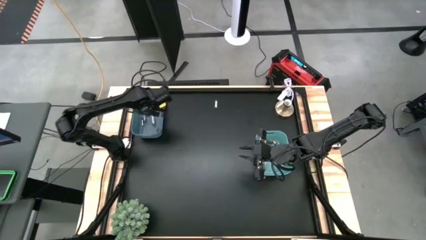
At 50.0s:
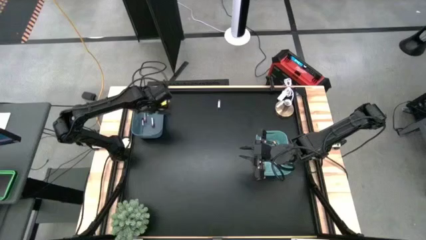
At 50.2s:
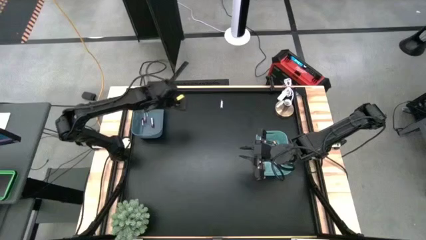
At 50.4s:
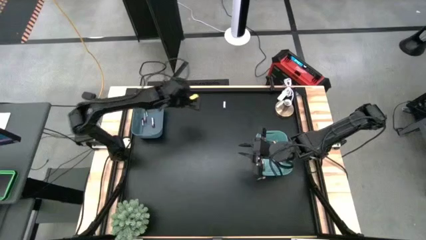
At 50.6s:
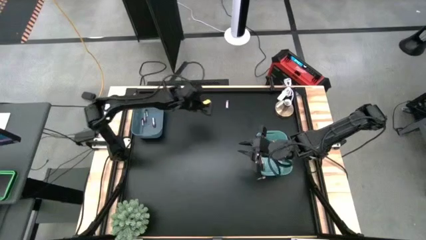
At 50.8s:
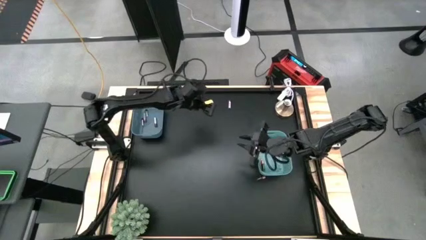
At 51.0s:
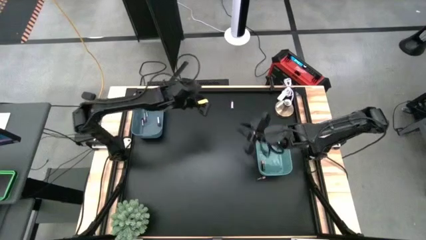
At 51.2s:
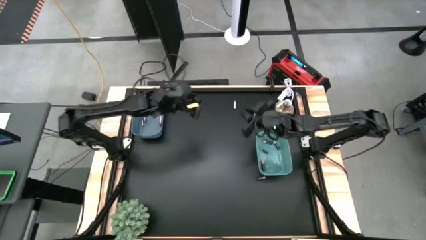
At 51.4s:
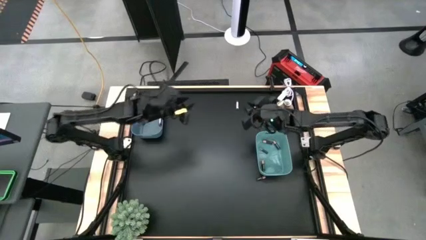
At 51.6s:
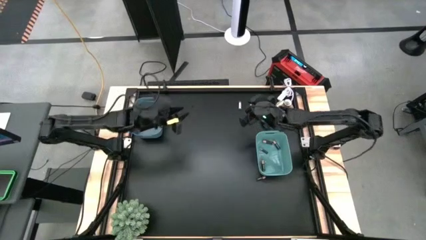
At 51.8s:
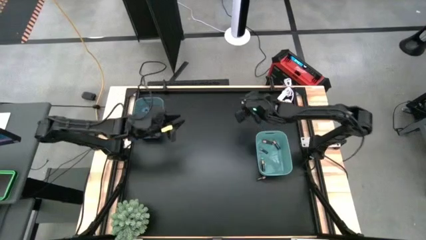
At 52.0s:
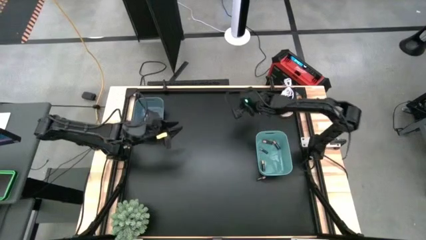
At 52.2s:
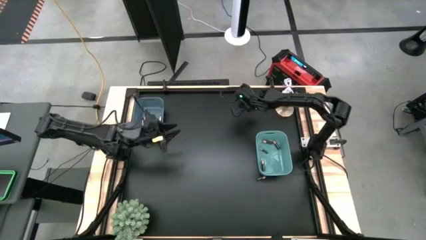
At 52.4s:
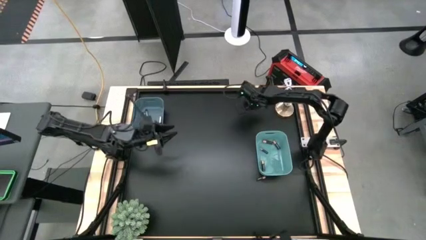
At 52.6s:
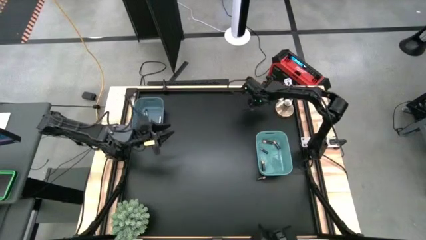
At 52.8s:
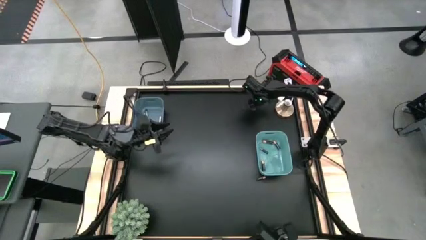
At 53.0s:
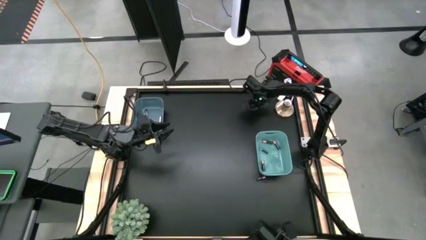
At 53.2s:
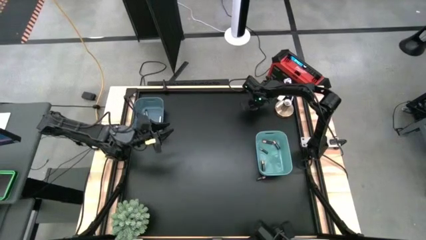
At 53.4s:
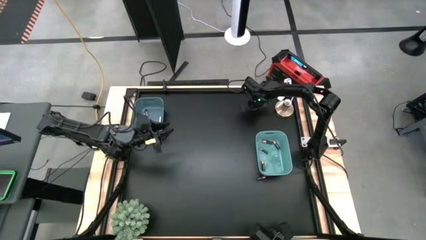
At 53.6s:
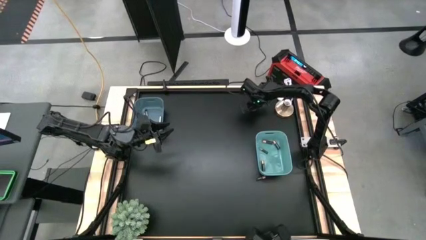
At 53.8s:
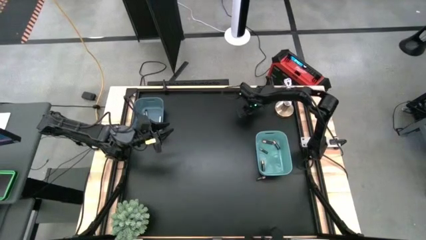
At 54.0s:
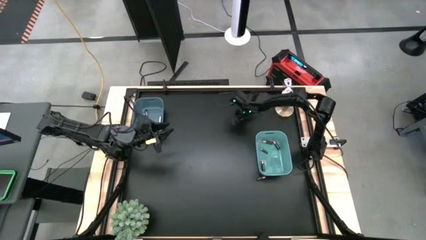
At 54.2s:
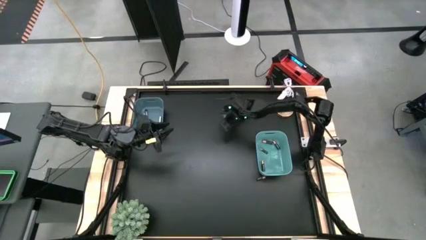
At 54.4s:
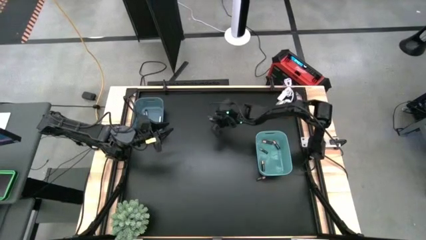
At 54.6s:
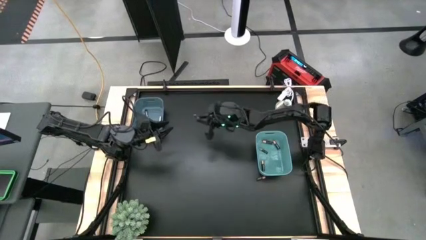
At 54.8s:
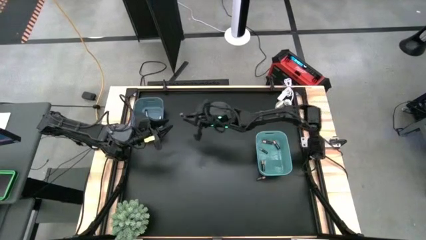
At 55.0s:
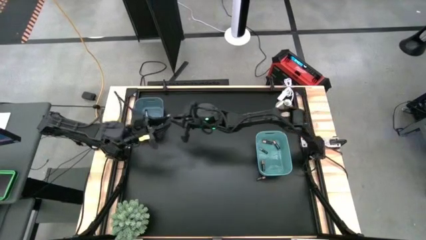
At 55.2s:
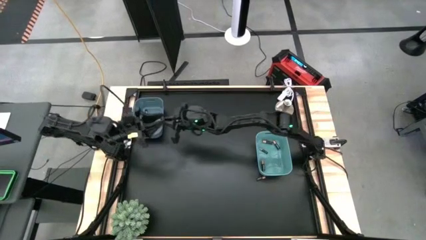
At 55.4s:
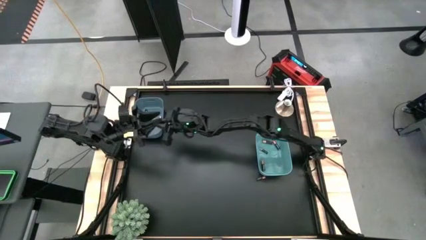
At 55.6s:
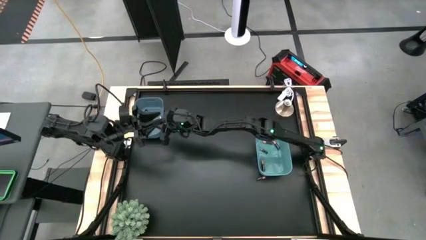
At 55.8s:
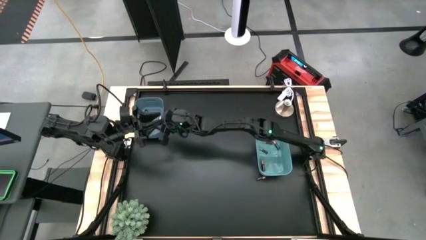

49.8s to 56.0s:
Task: Sort batteries
Put the silver battery into the blue bin

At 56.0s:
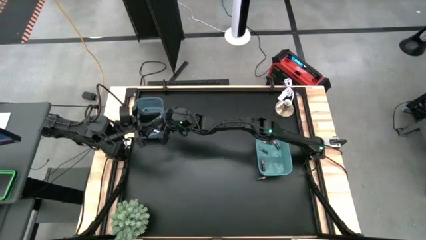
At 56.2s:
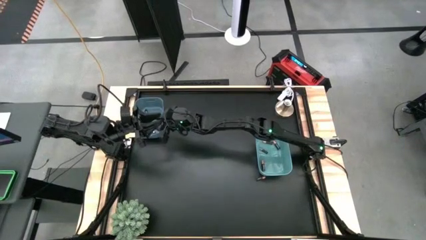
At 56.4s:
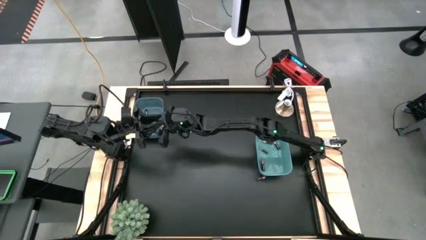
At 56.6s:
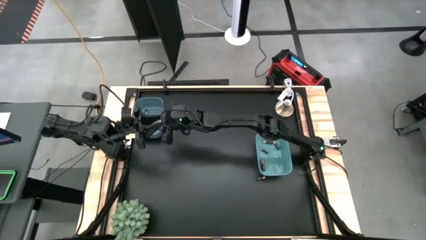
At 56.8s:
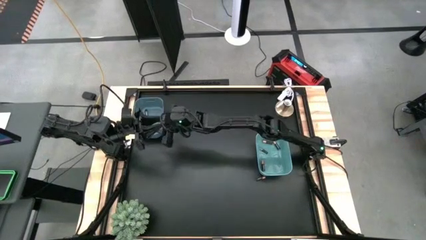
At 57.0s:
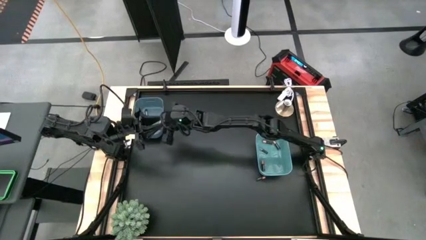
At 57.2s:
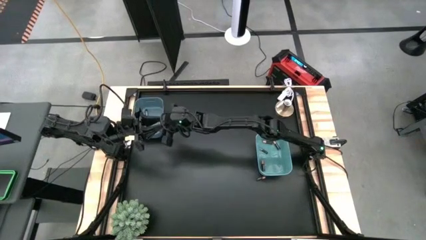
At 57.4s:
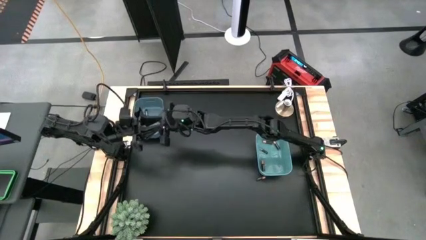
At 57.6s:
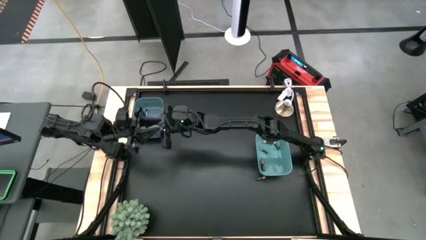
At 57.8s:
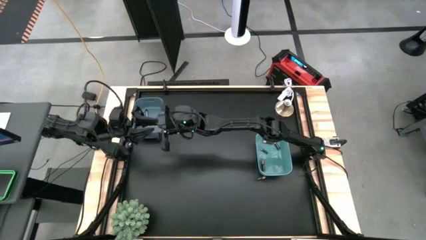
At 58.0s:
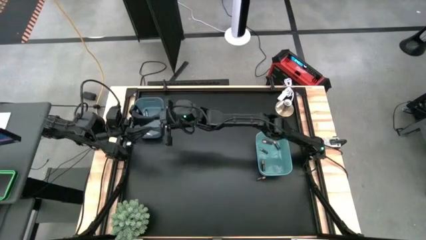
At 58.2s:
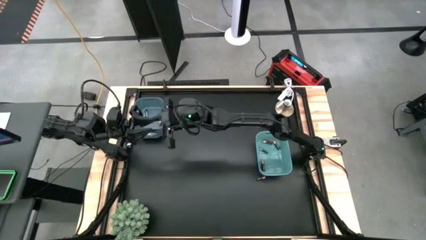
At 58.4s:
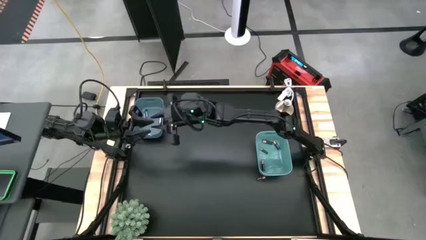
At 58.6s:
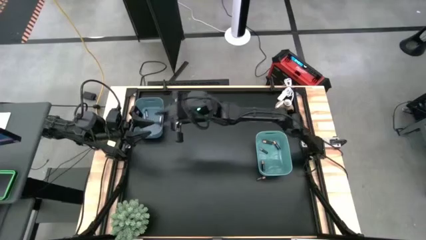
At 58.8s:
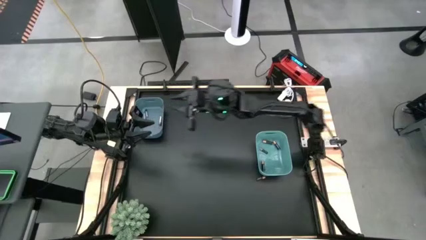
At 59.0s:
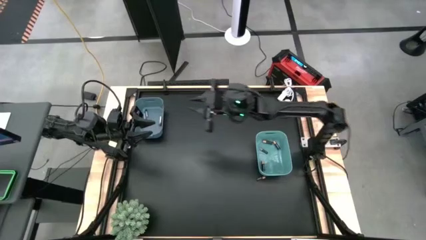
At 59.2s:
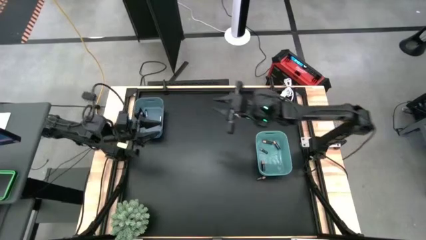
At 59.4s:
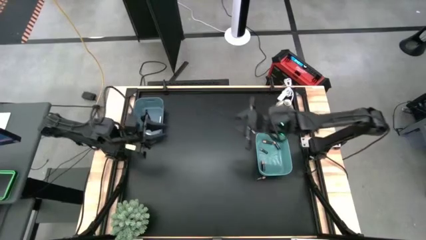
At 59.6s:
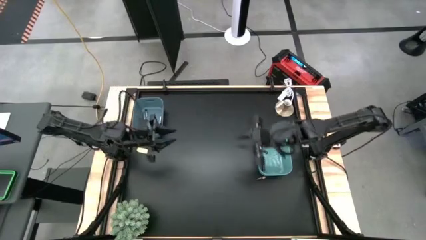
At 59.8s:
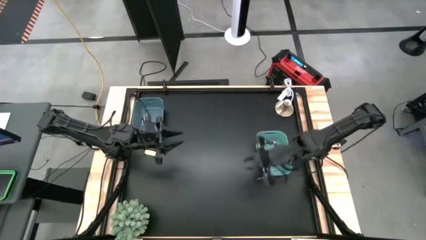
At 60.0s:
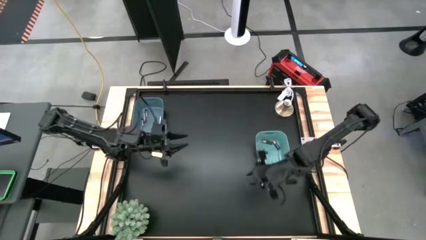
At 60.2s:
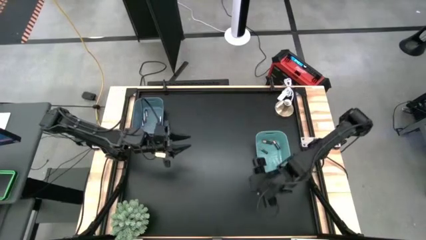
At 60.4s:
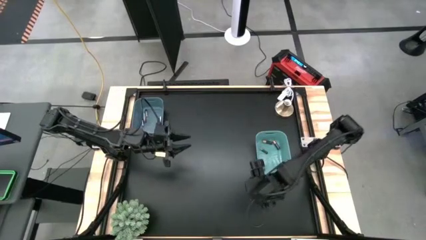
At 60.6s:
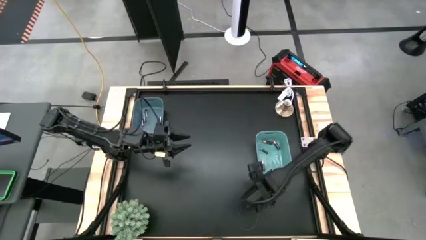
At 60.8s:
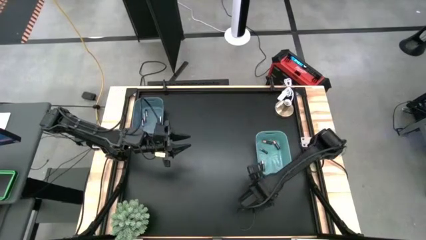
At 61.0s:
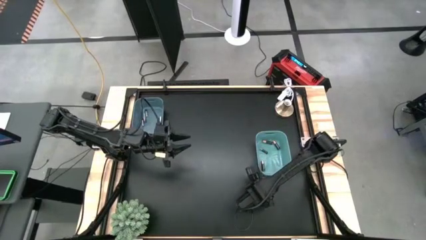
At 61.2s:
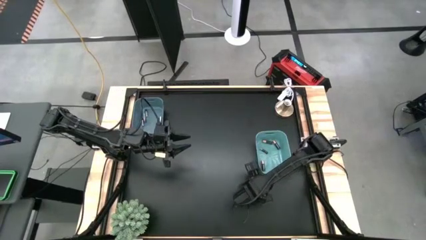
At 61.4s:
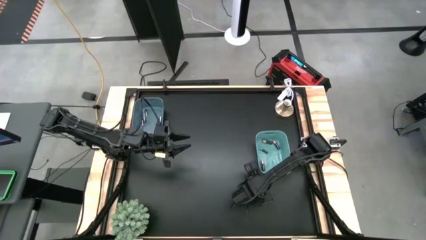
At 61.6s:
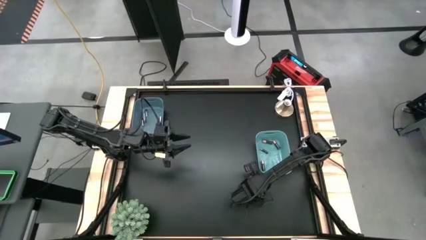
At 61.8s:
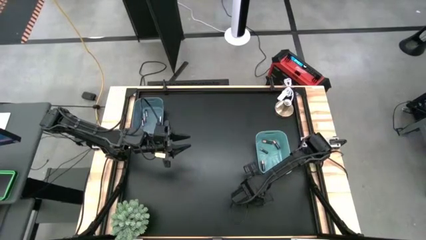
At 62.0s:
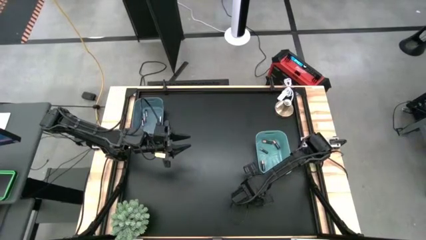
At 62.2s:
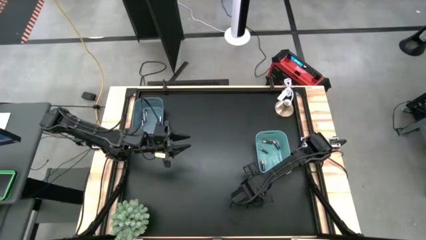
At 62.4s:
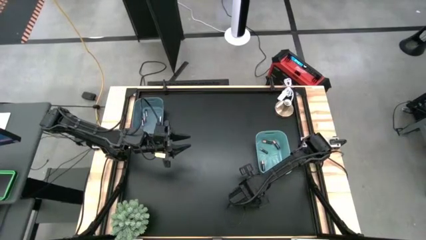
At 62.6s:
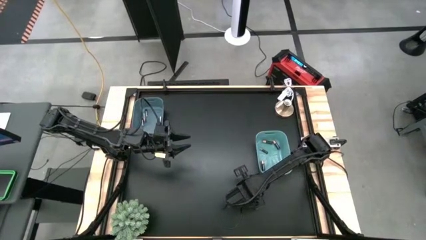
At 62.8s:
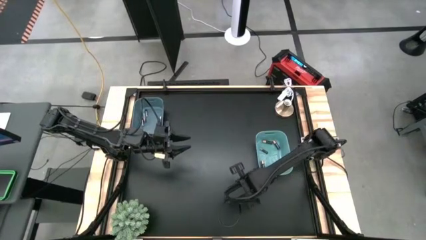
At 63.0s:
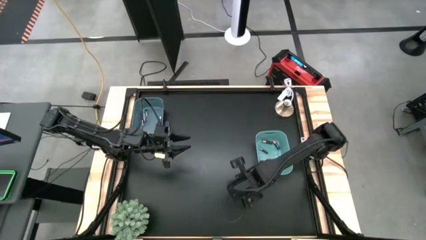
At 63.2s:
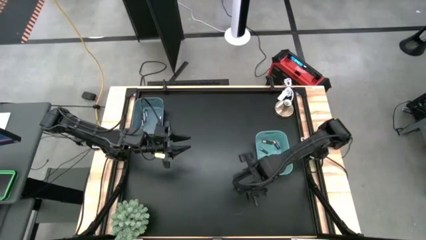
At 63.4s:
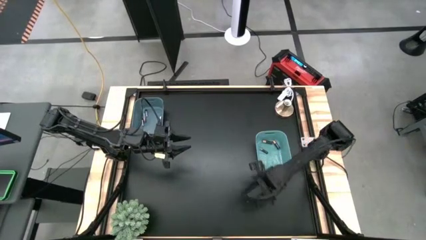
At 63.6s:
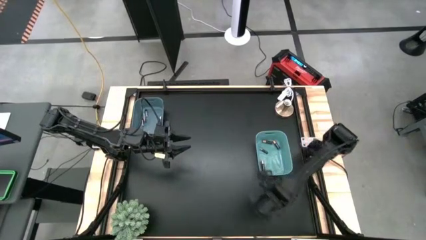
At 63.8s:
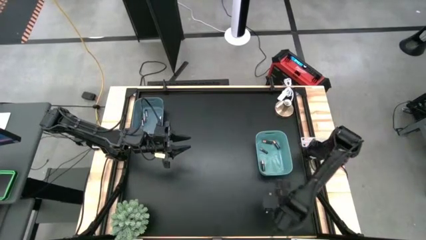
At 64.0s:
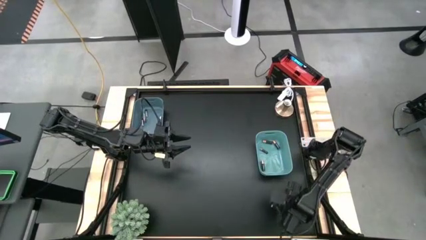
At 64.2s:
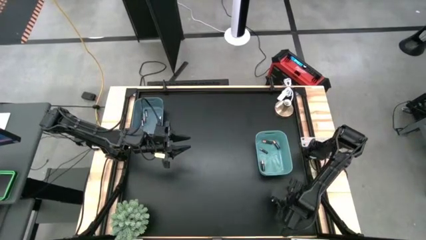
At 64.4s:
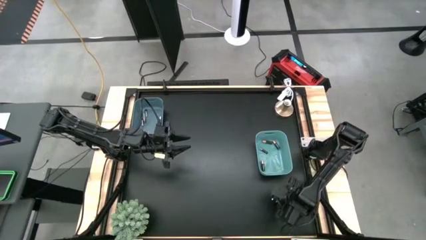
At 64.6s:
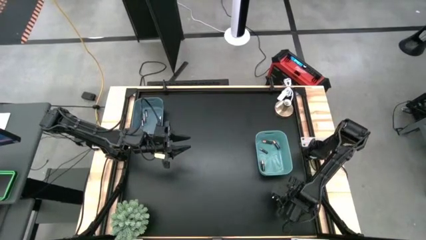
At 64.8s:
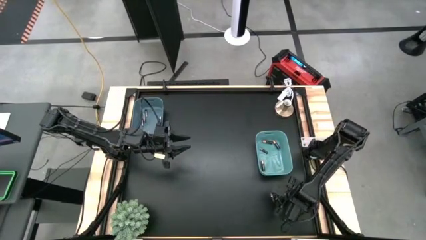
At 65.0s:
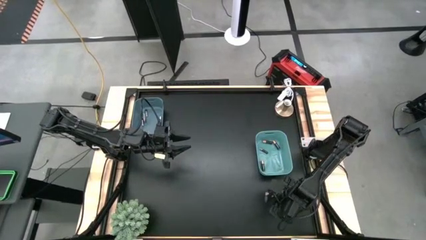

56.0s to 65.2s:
Put the brown battery into the green bin

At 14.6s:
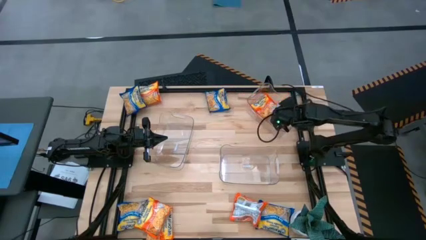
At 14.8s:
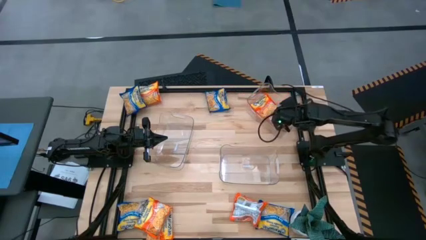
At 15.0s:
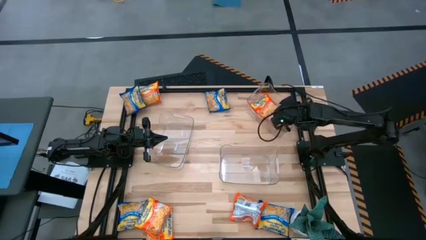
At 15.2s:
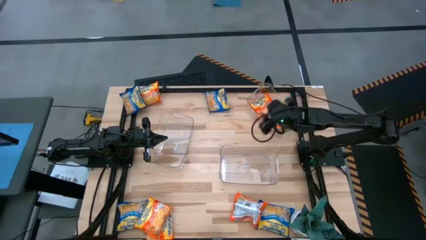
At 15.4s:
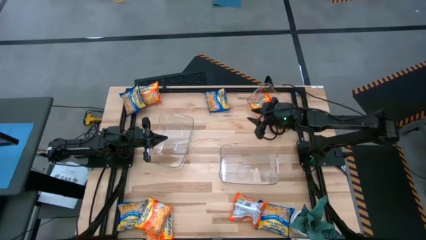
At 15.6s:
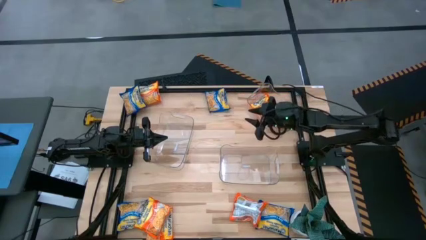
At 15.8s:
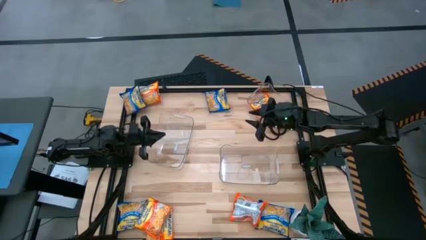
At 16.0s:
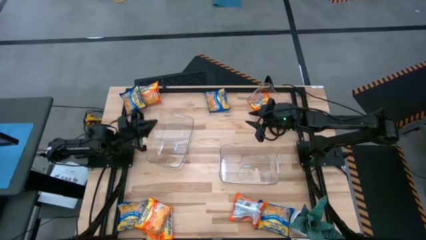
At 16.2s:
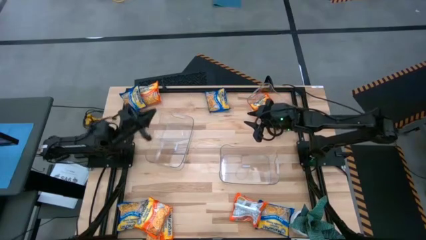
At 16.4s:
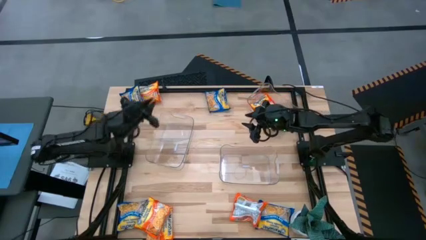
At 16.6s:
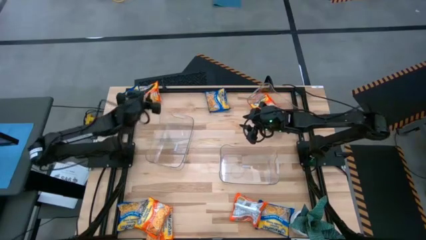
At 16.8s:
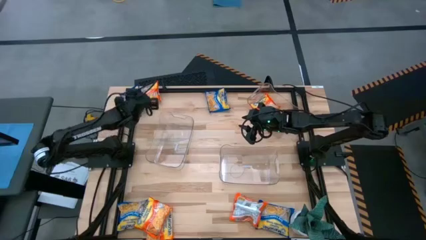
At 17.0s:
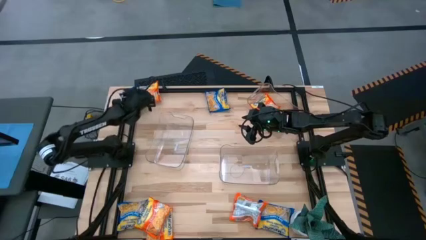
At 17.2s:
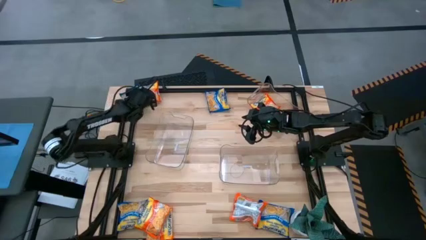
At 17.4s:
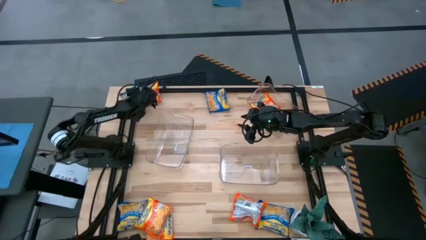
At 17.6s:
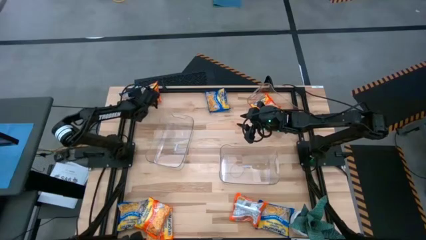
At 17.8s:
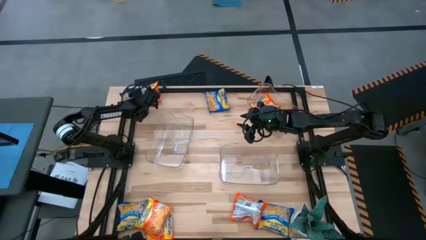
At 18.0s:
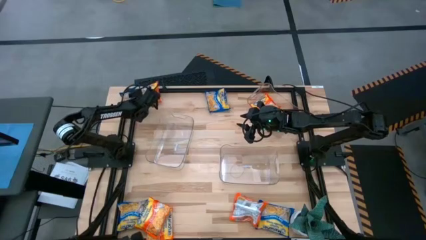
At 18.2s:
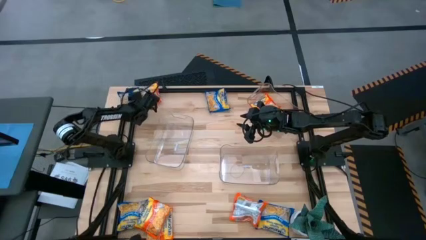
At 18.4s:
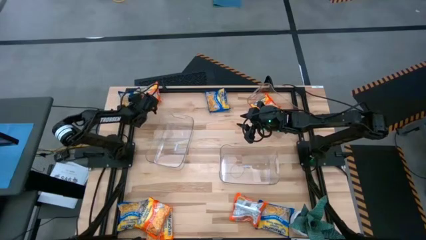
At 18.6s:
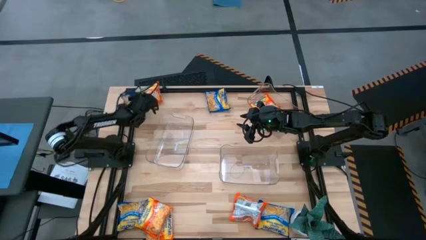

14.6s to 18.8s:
Task: Sort Maruchan noodles
Put the blue noodle pack into the middle transparent bin
